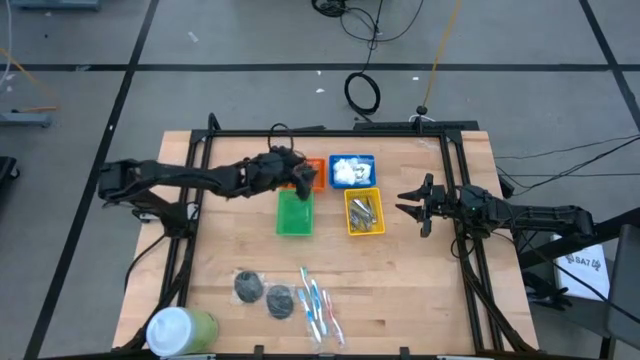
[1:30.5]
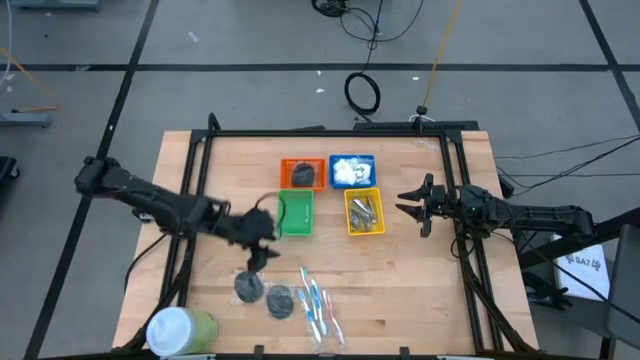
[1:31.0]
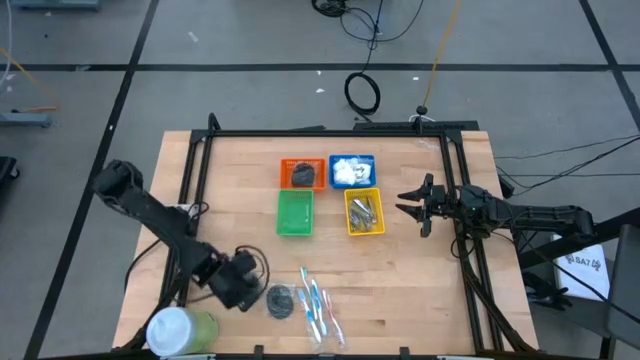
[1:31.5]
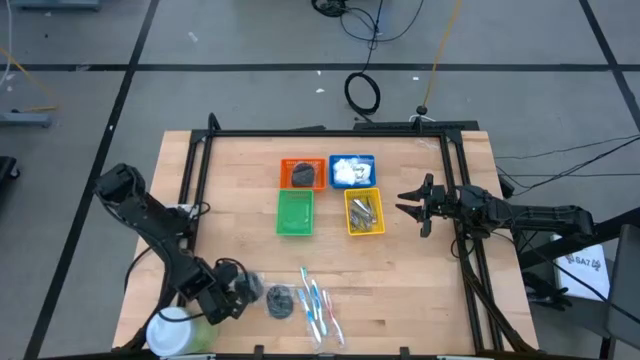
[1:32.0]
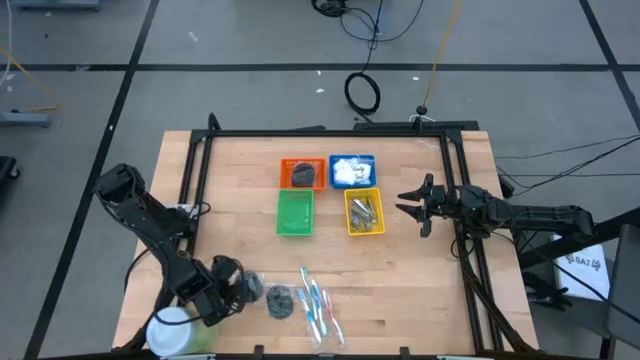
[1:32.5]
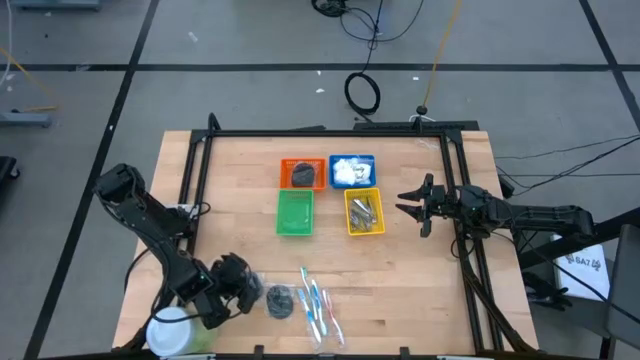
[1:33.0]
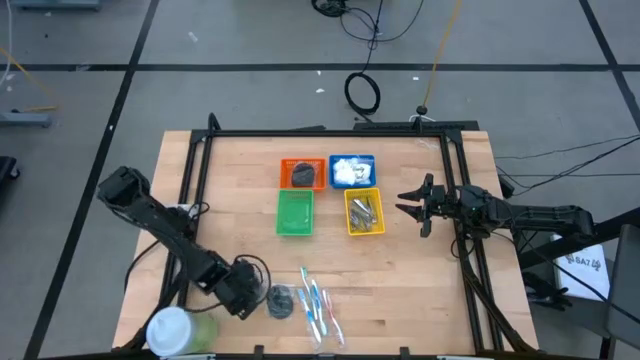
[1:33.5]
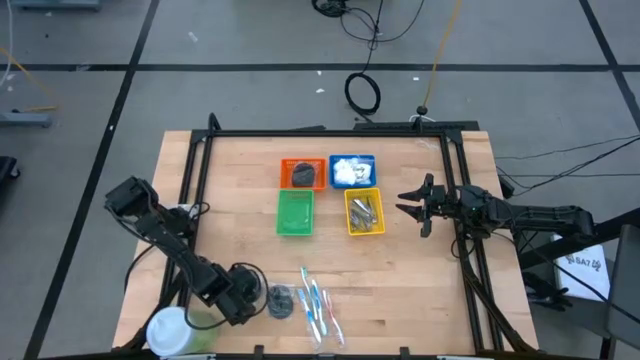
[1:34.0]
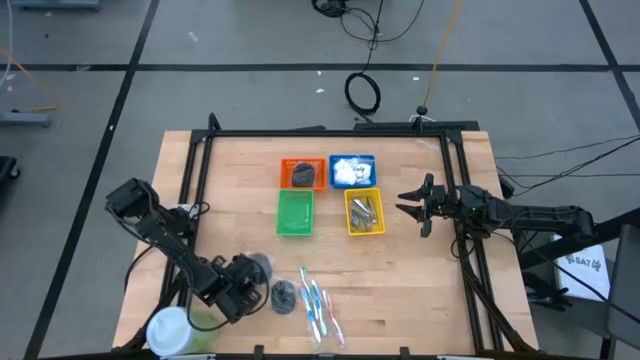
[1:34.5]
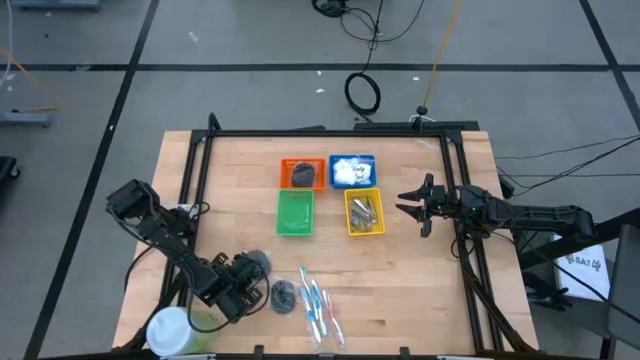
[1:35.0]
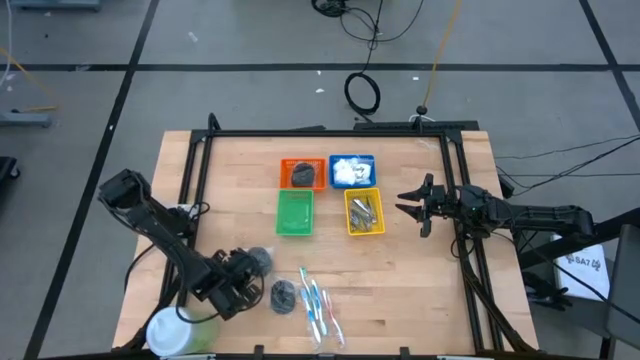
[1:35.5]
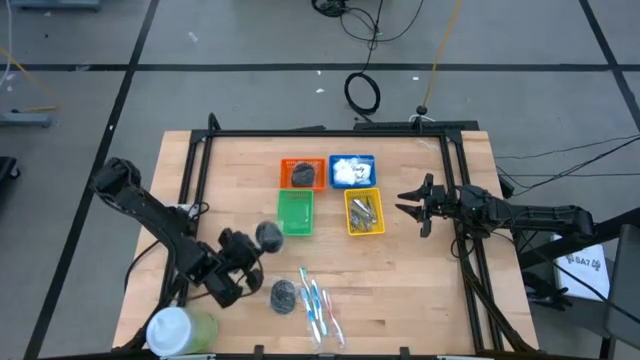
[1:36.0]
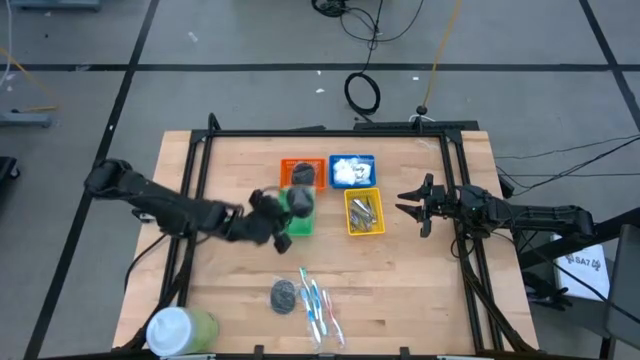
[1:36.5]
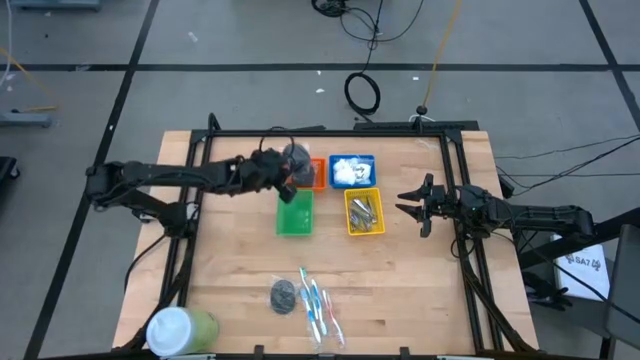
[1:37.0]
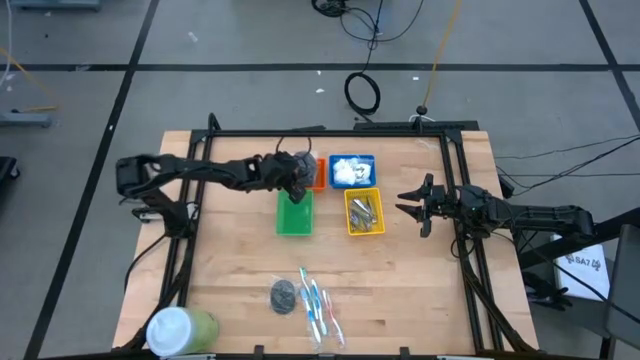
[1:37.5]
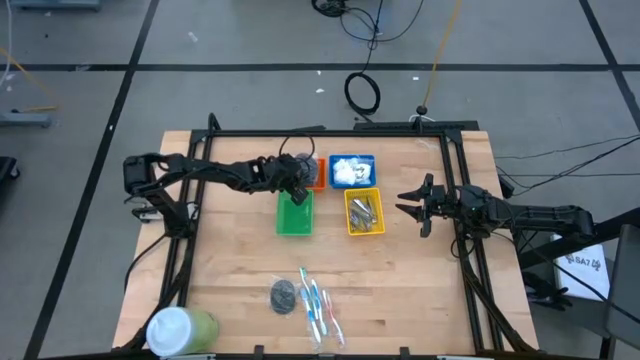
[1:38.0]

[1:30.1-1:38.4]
Task: Pick & Place Travel size toiletries
Put the black hairbrush into the orange bin

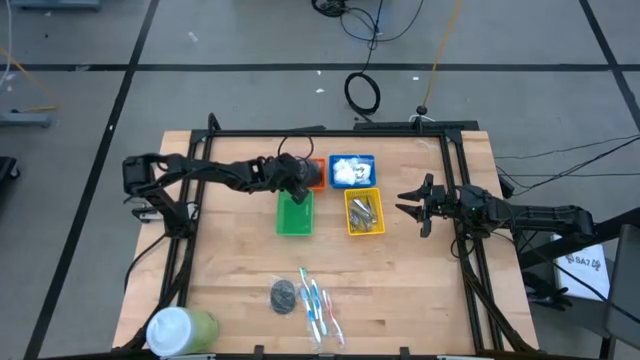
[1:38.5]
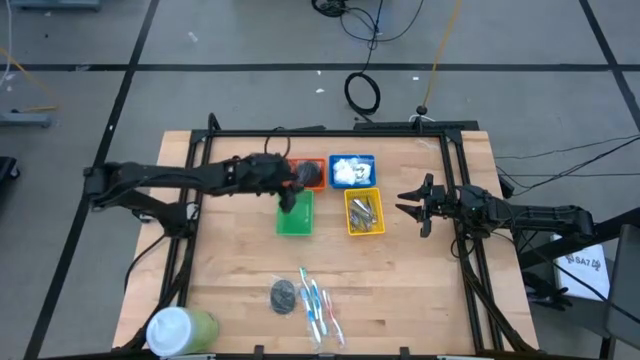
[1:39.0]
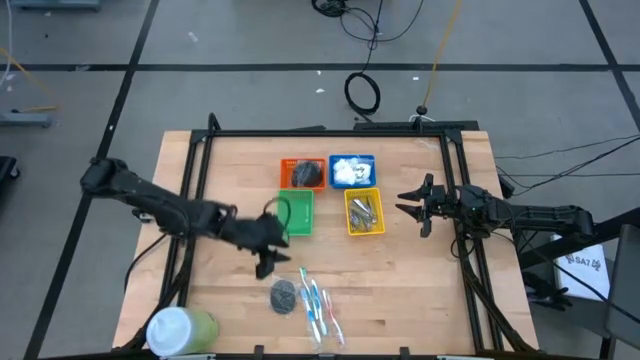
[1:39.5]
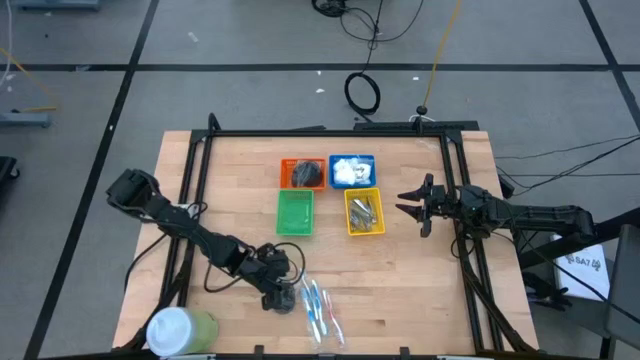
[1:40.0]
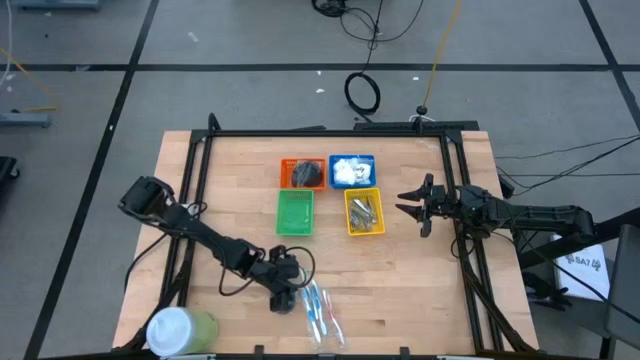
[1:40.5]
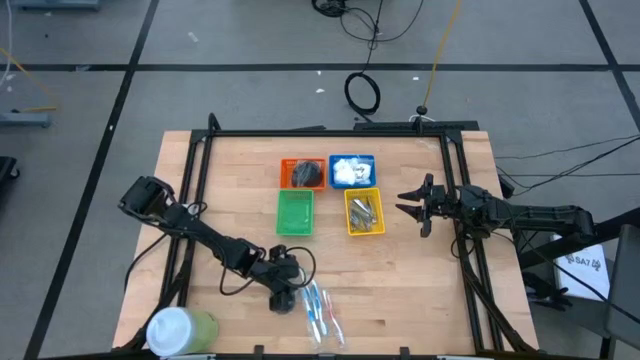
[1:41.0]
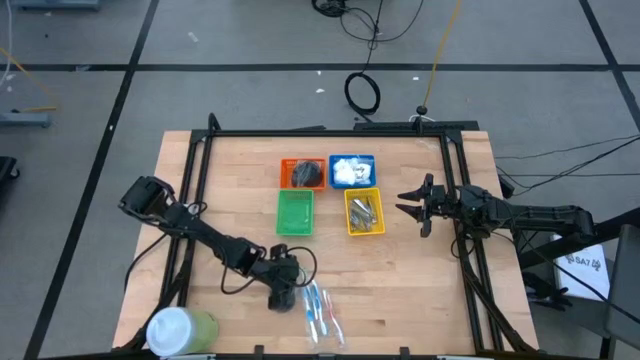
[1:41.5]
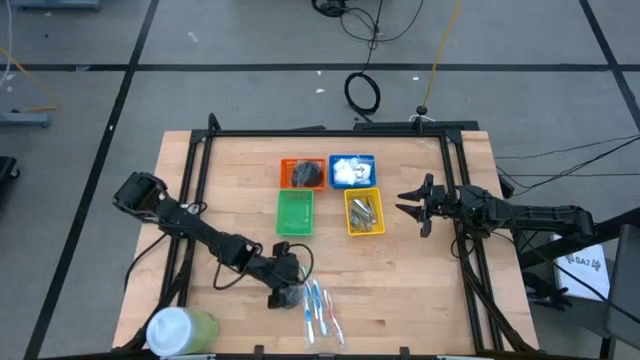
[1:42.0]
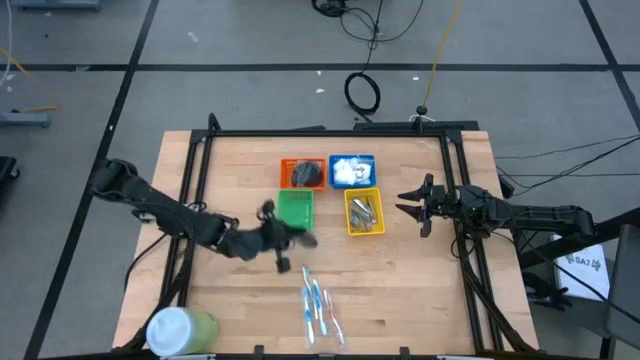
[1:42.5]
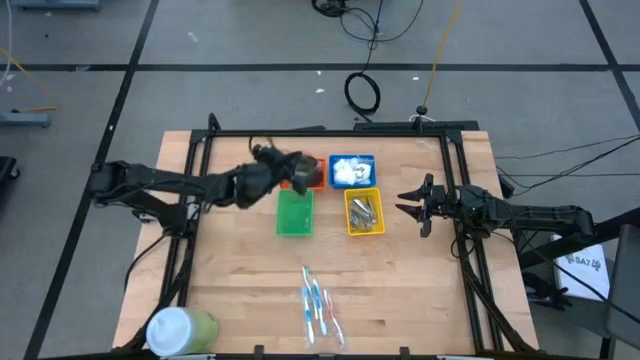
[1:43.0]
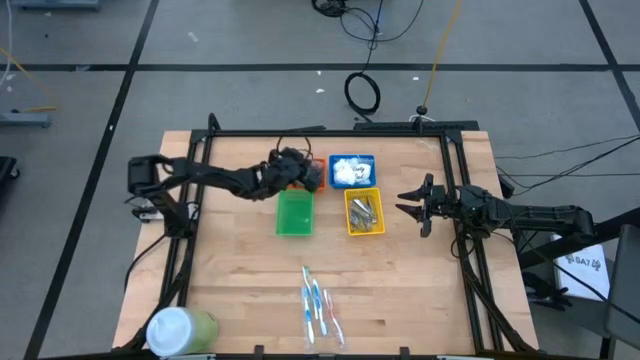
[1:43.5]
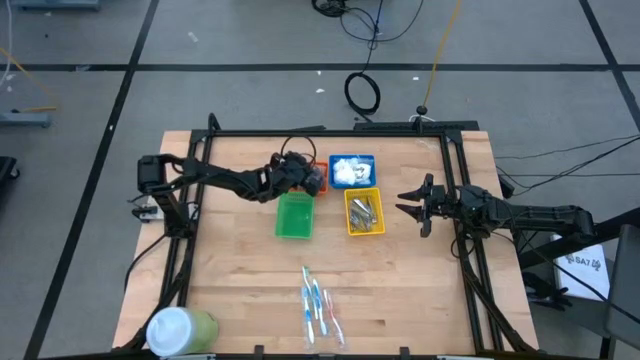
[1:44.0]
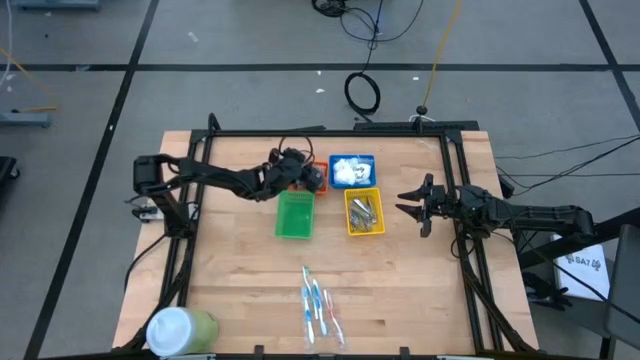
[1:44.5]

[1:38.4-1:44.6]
Put the black hairbrush into the orange bin

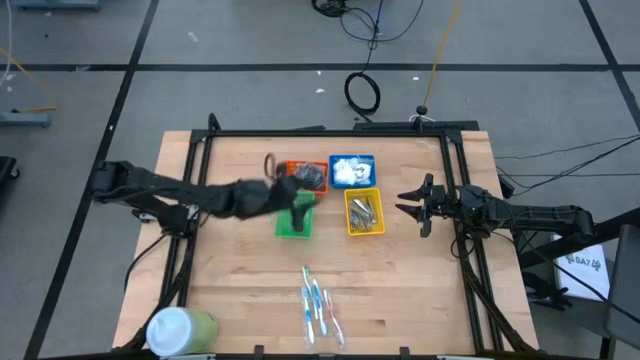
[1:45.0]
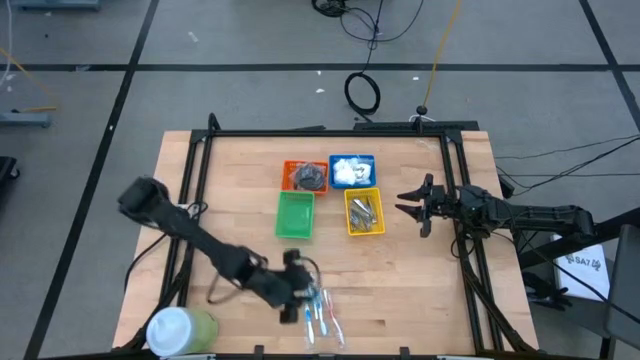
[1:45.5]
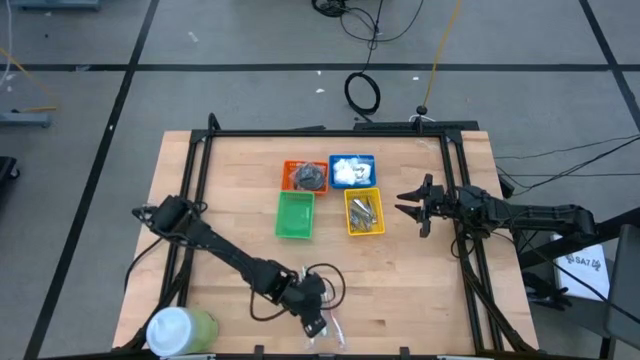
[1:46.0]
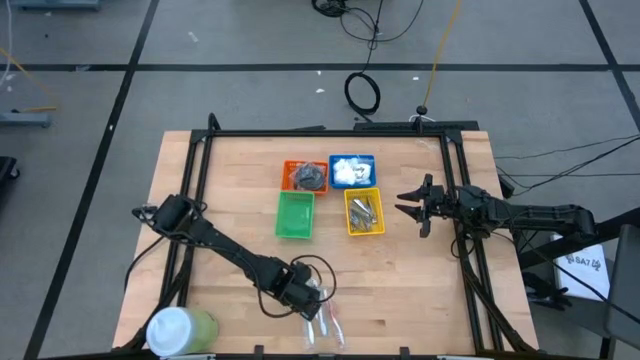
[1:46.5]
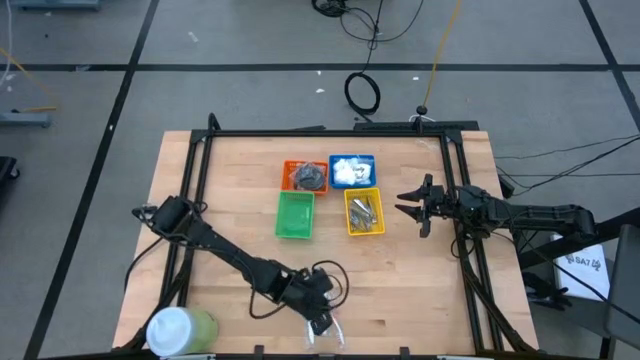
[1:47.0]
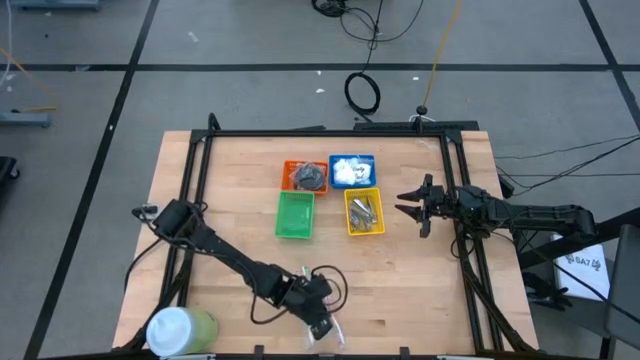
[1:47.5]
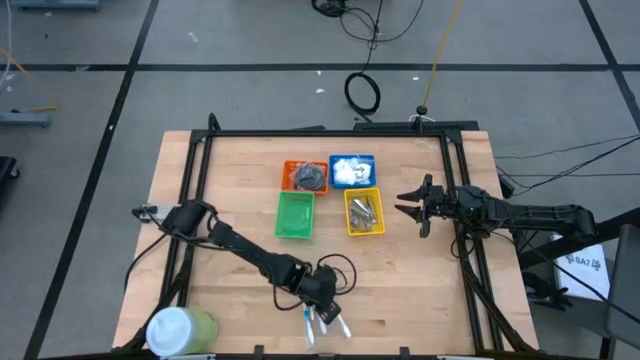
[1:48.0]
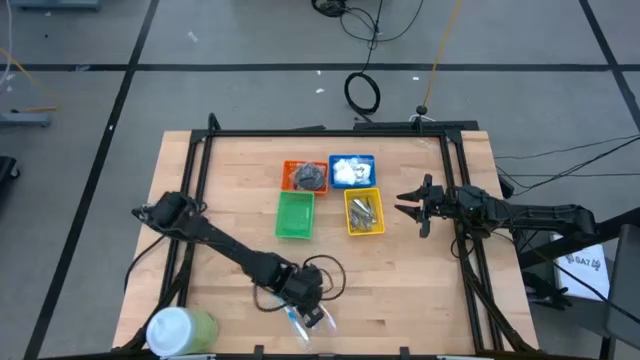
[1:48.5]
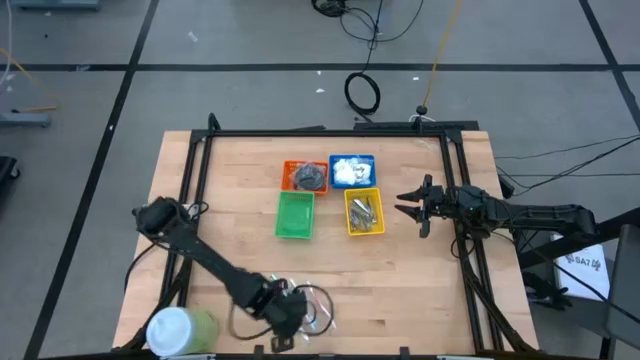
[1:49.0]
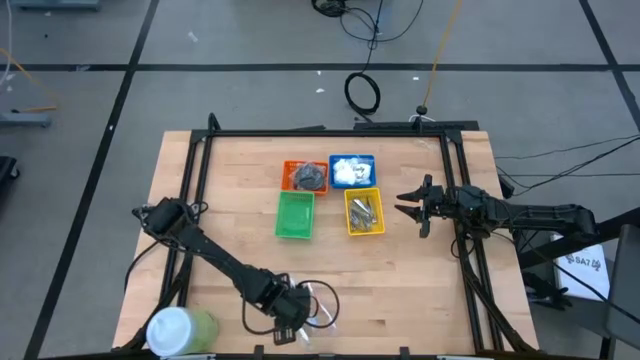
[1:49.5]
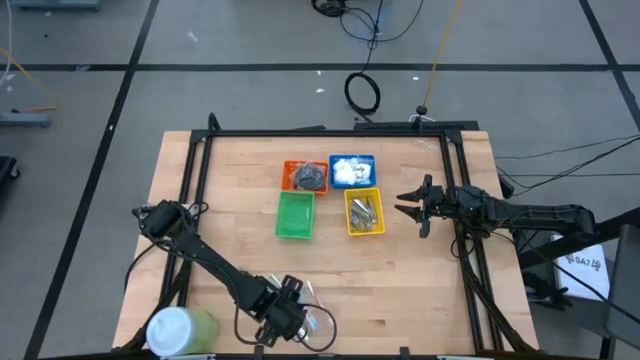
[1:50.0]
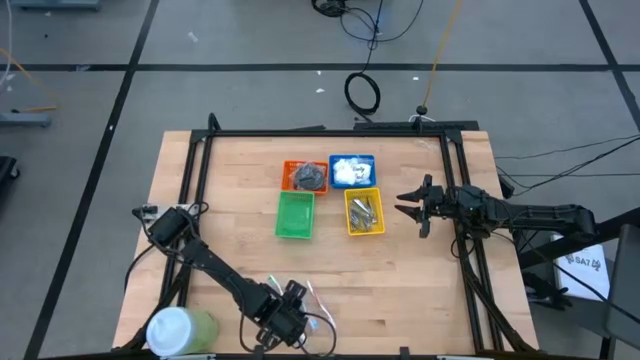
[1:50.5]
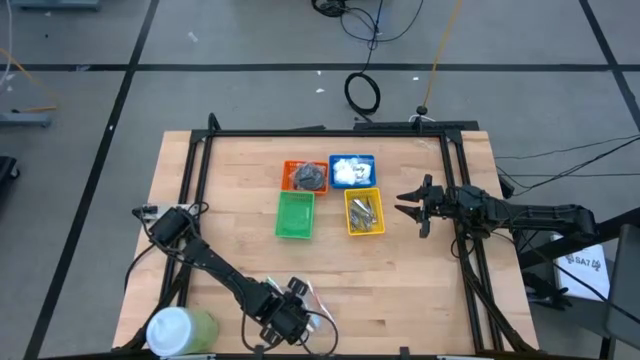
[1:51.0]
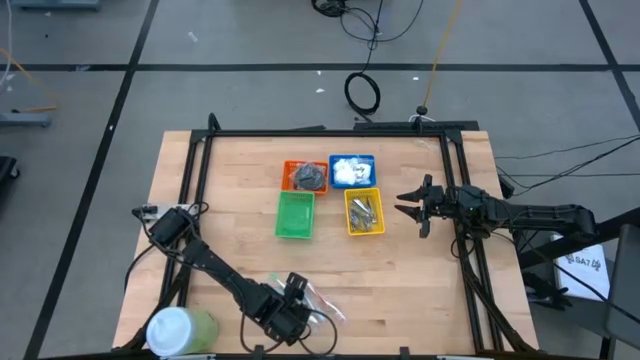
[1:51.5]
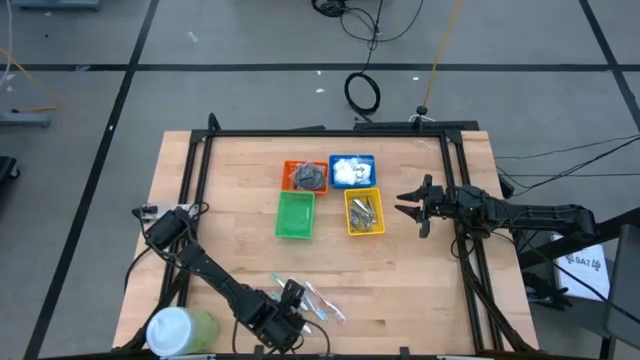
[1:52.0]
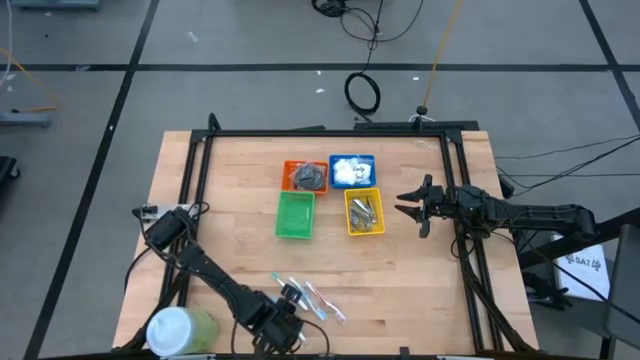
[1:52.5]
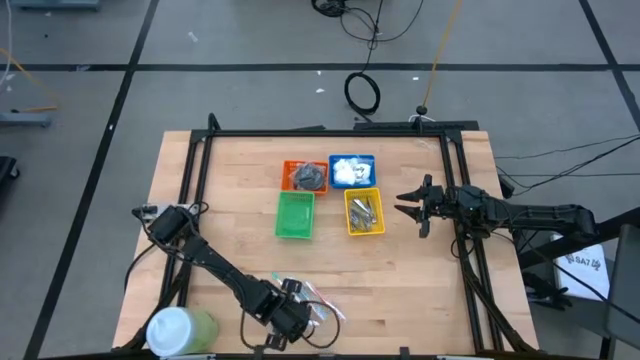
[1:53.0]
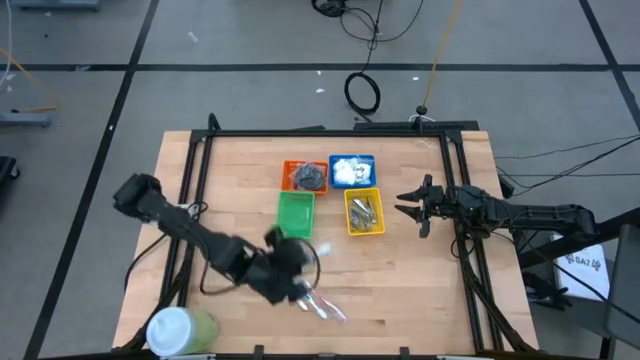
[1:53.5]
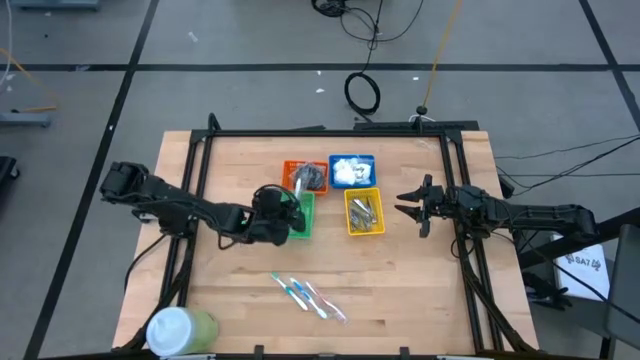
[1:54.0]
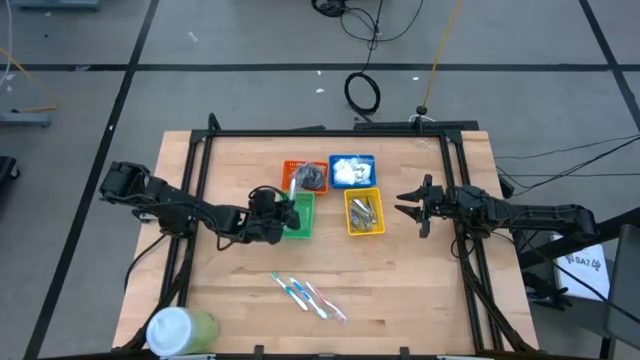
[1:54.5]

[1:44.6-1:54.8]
Put the blue toothbrush into the green bin
